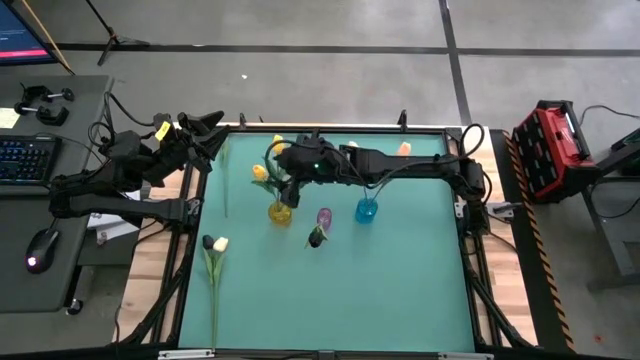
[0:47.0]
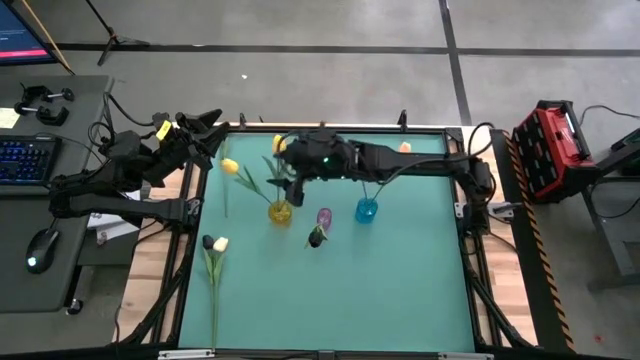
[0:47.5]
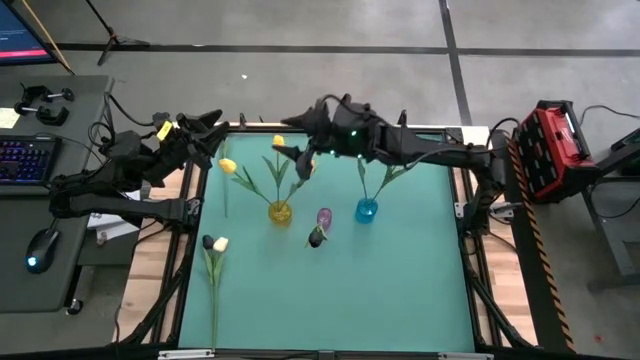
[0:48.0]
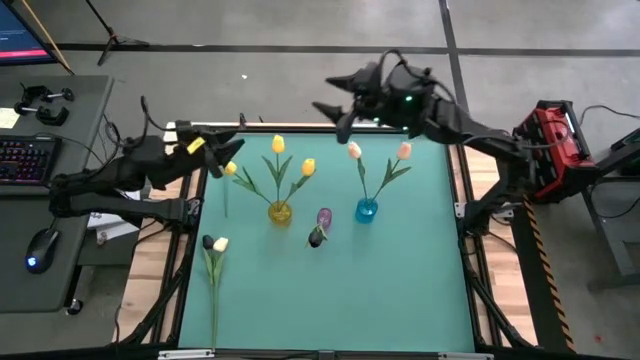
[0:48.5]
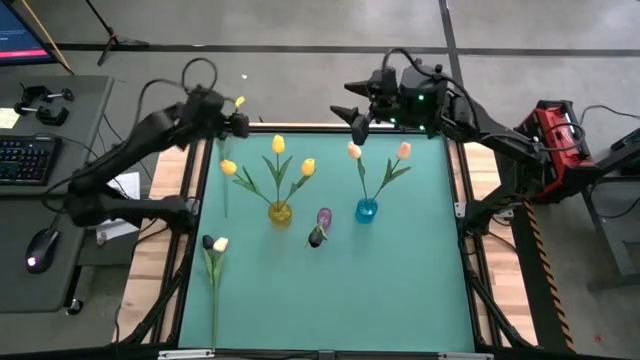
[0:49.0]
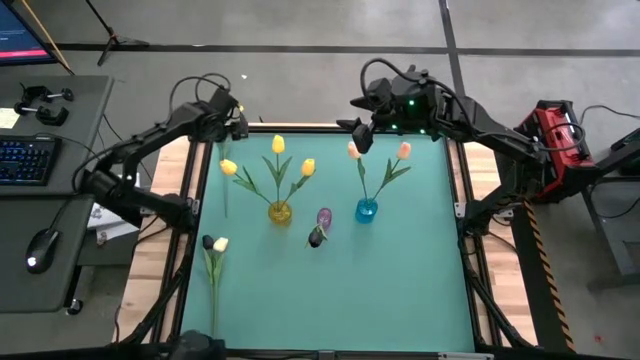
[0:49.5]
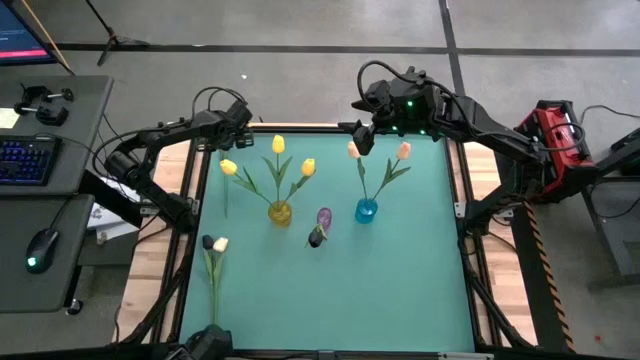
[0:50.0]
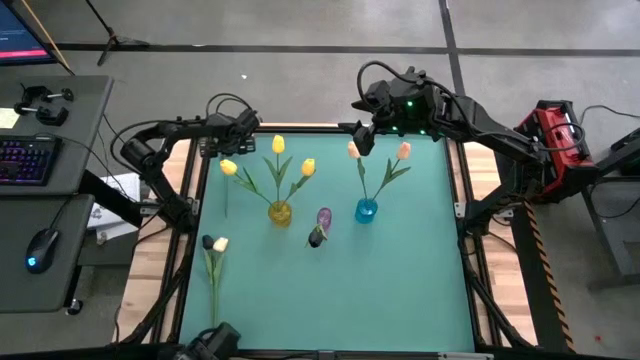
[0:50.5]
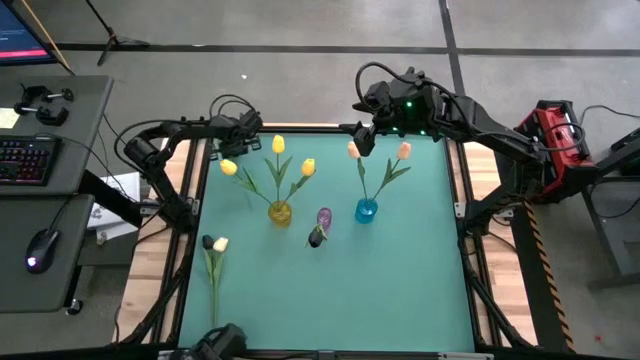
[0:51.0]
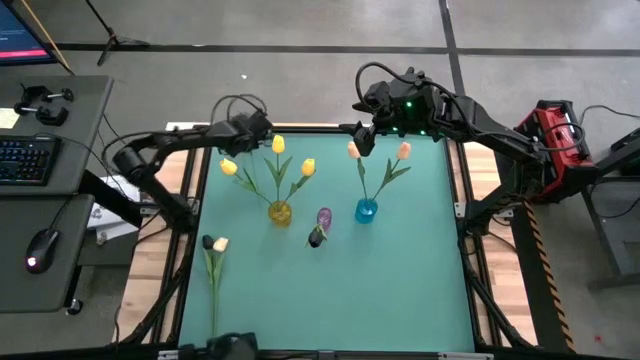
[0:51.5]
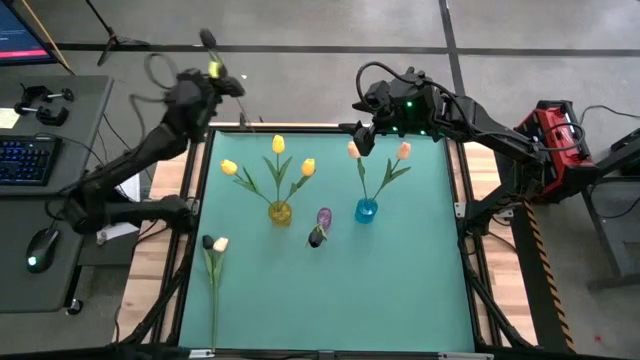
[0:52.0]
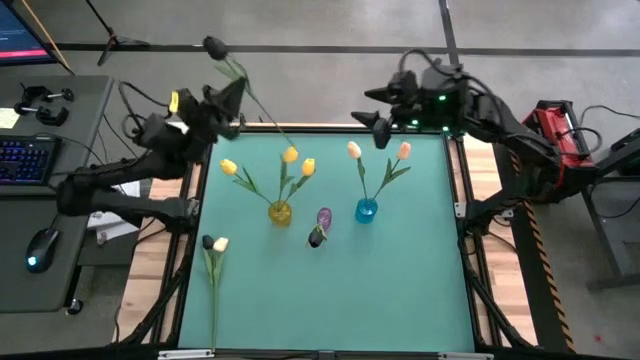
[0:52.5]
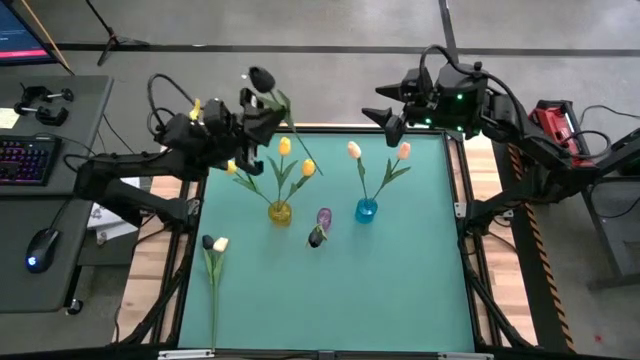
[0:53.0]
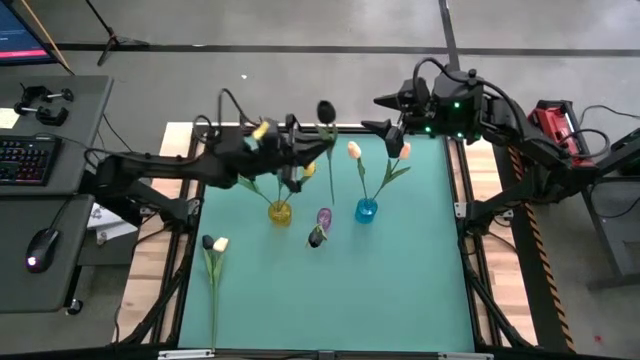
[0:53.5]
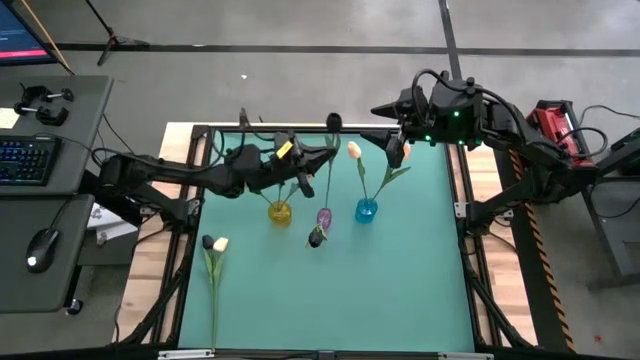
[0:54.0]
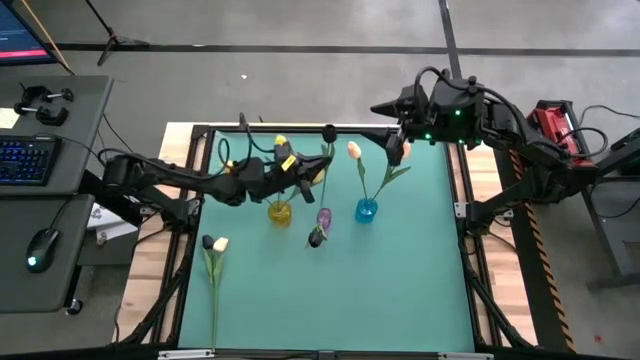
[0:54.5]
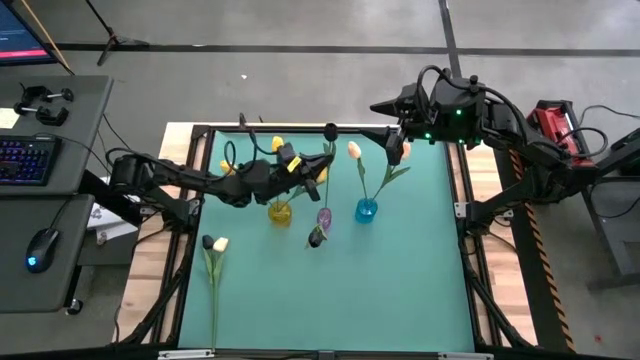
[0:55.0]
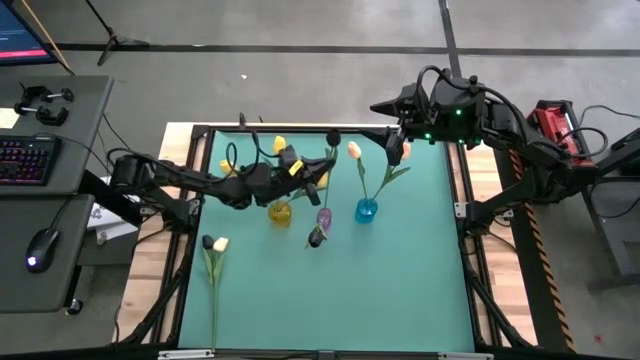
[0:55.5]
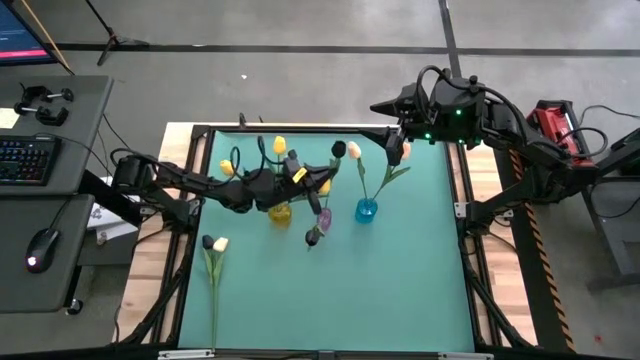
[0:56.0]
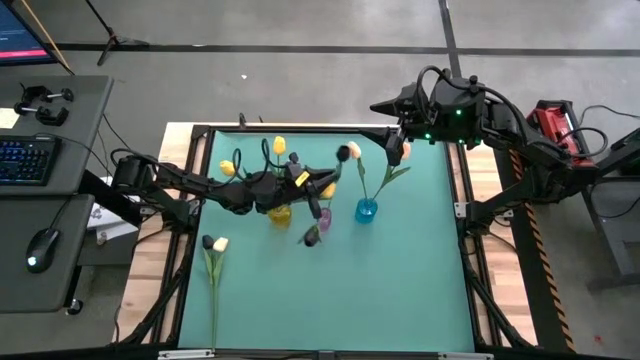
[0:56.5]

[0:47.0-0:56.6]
Task: Sort flowers into vase by color
Put the top black tulip into the purple flower vase

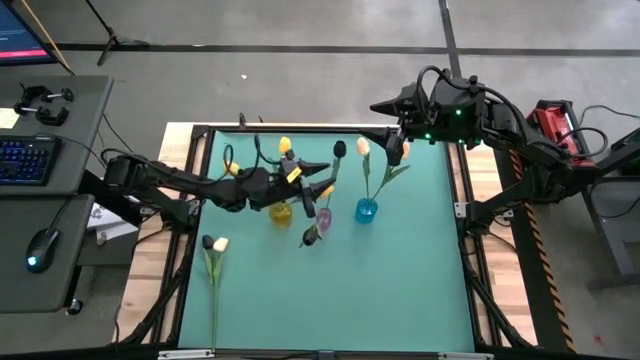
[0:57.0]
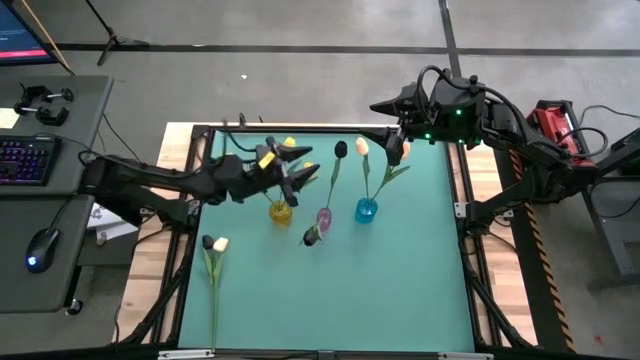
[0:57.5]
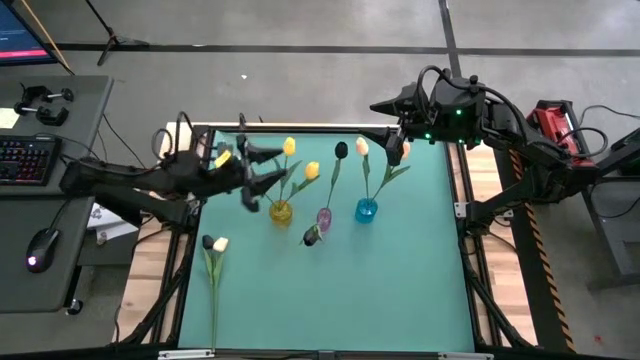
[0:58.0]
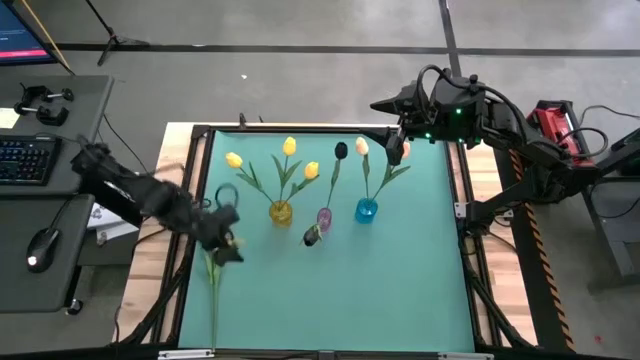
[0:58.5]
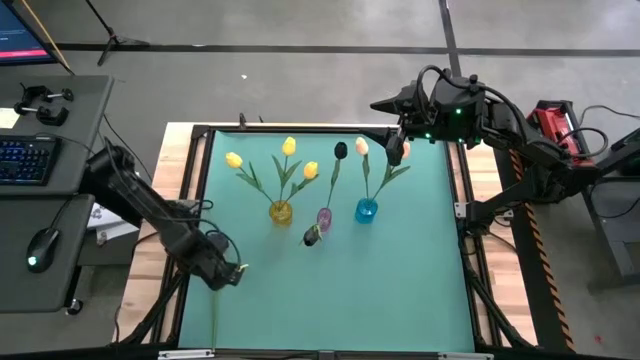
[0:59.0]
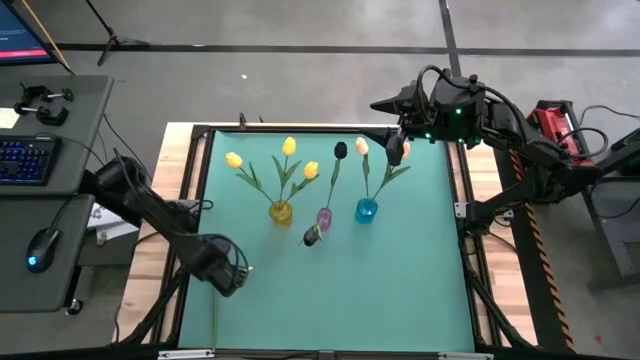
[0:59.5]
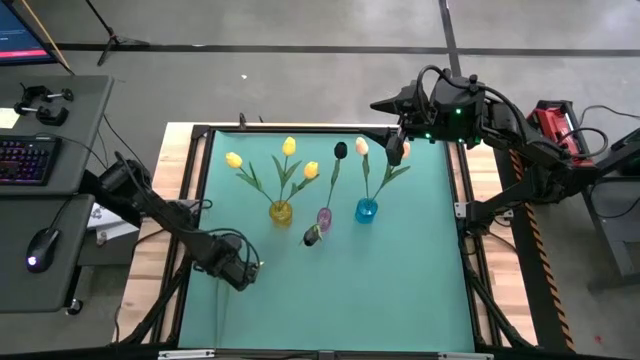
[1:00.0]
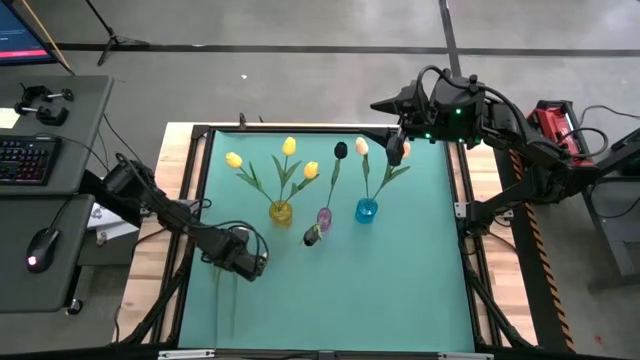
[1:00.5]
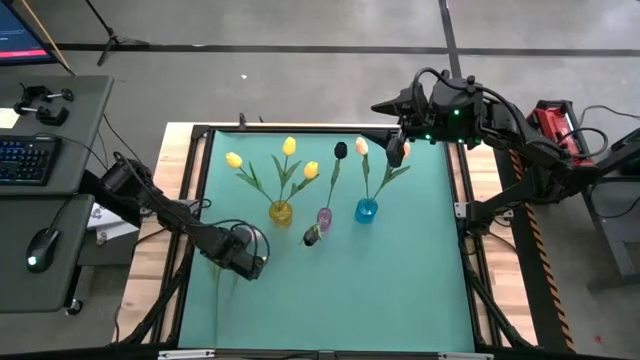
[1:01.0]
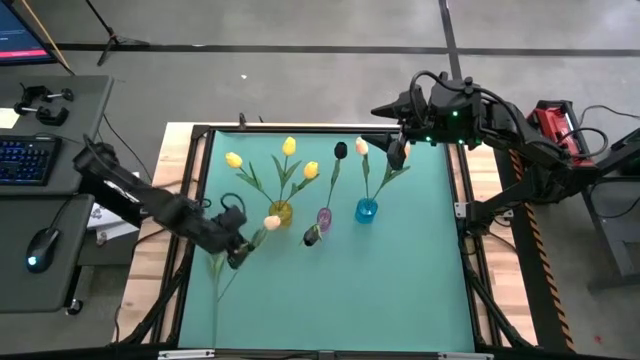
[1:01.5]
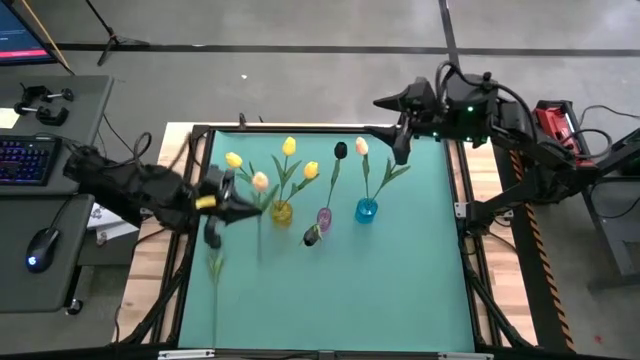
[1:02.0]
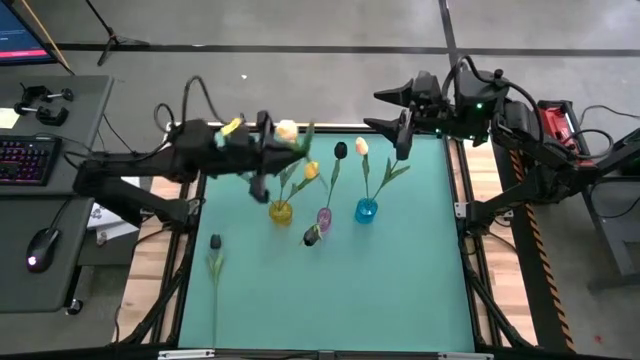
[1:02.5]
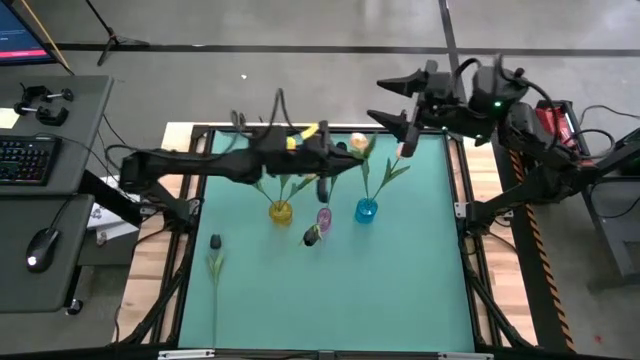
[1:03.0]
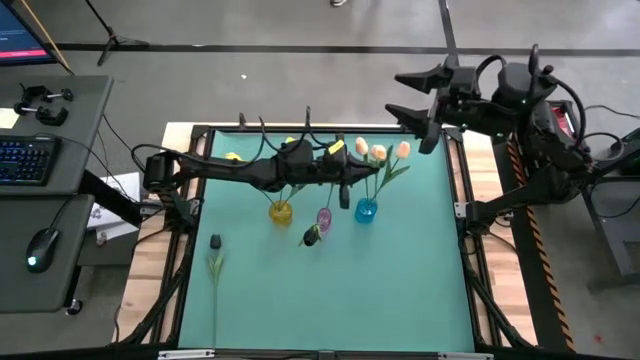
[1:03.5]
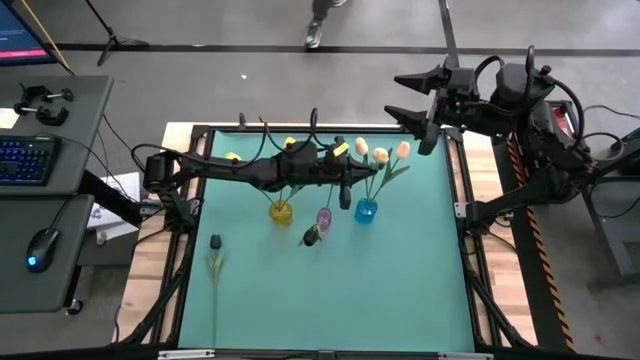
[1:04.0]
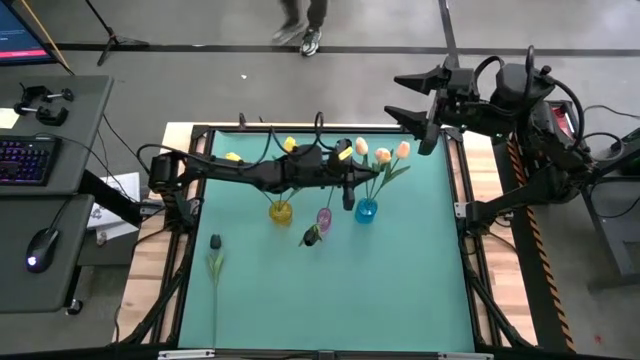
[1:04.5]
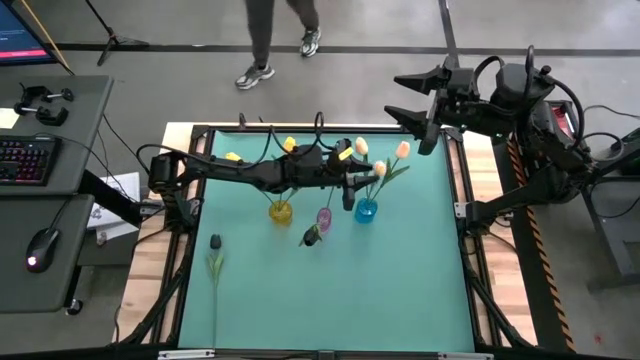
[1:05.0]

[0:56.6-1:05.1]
Put the light orange tulip into the blue flower vase
